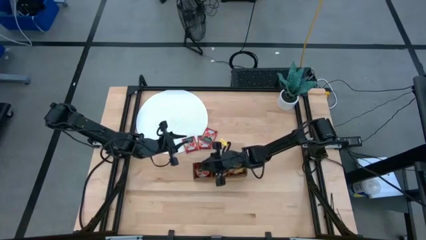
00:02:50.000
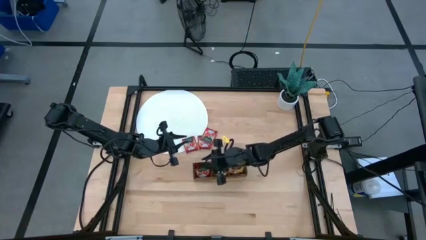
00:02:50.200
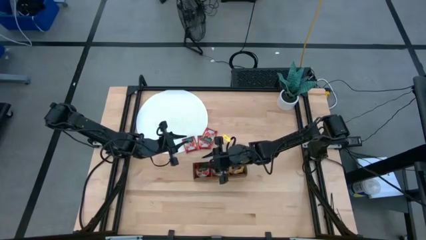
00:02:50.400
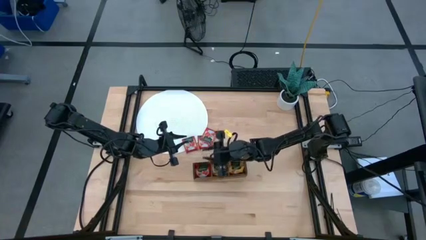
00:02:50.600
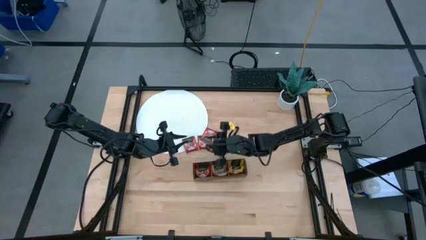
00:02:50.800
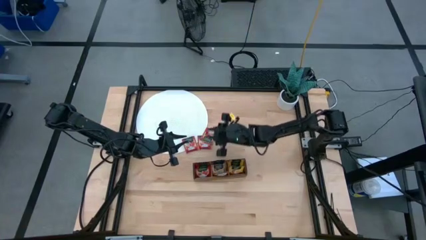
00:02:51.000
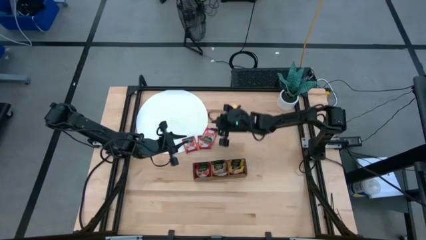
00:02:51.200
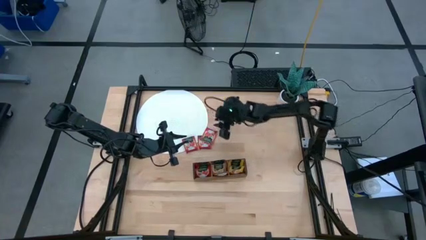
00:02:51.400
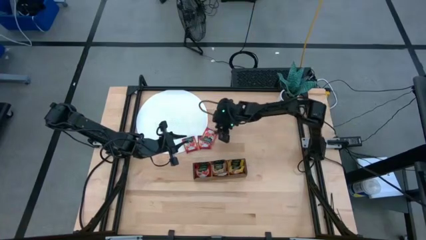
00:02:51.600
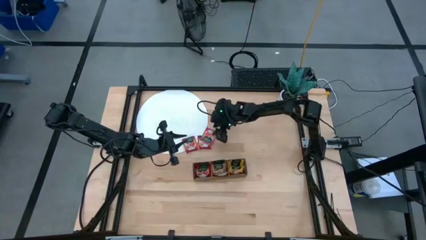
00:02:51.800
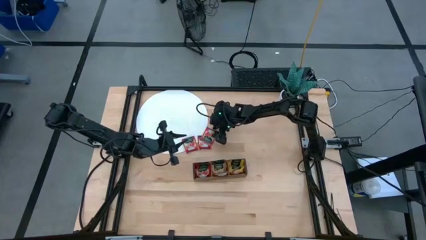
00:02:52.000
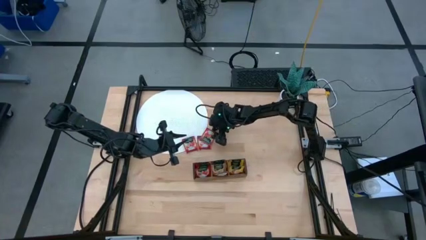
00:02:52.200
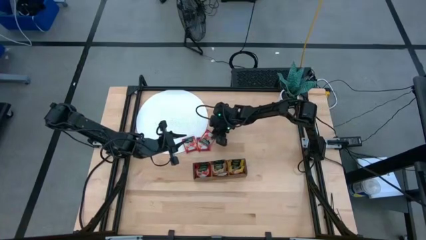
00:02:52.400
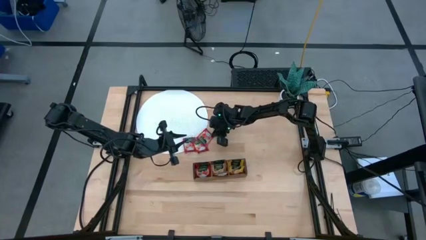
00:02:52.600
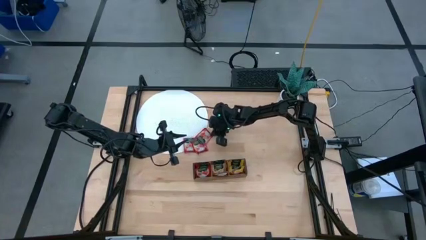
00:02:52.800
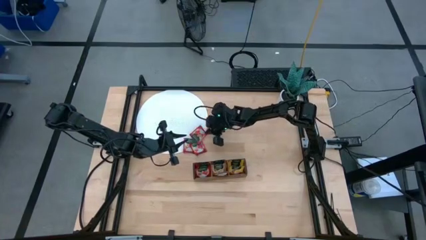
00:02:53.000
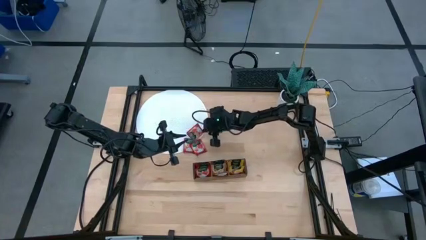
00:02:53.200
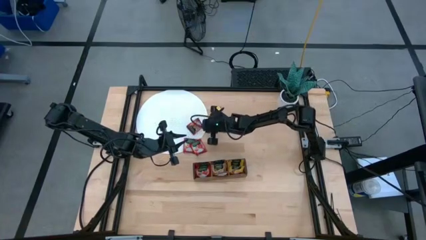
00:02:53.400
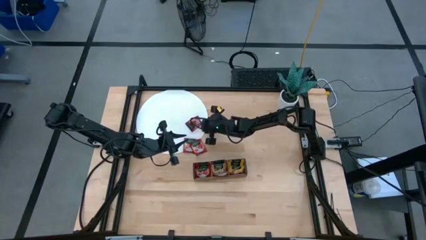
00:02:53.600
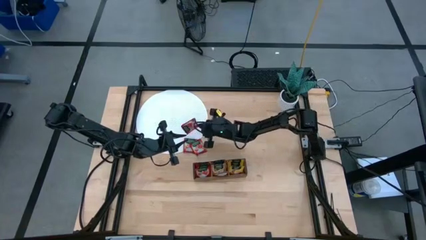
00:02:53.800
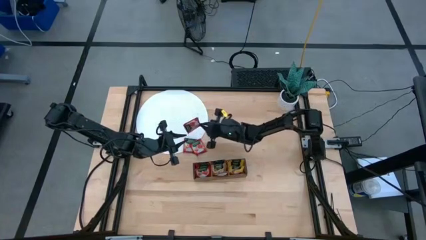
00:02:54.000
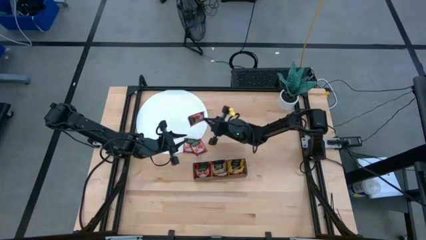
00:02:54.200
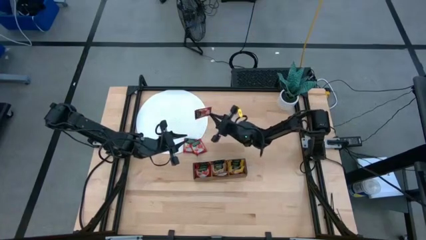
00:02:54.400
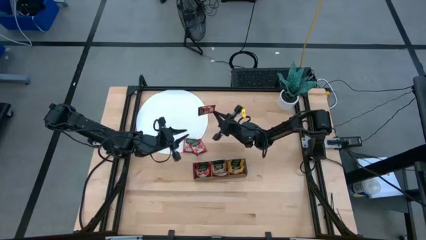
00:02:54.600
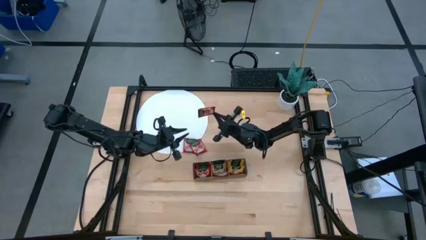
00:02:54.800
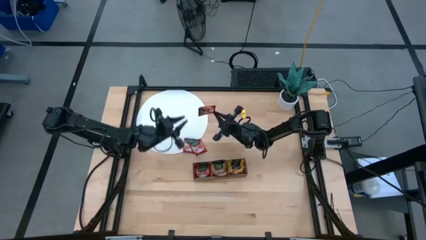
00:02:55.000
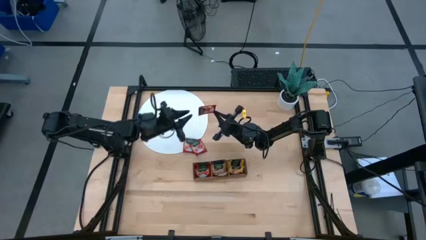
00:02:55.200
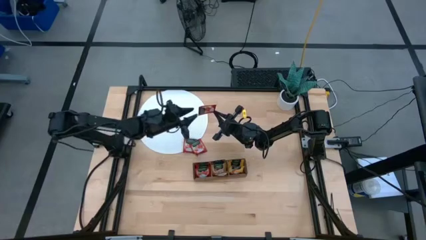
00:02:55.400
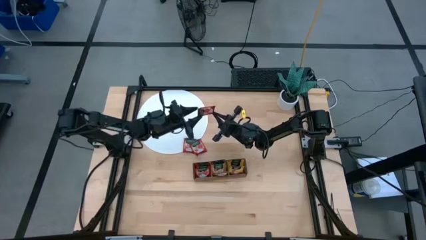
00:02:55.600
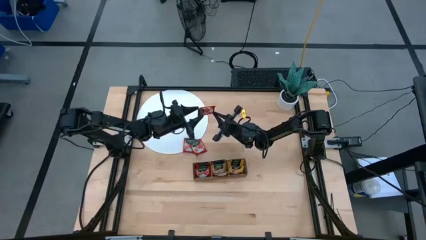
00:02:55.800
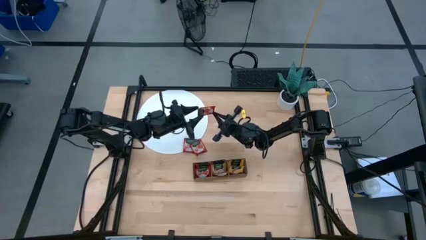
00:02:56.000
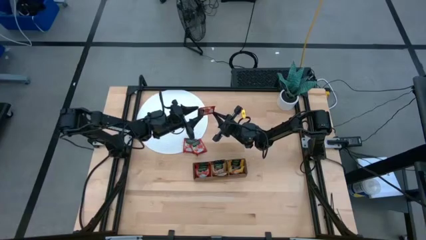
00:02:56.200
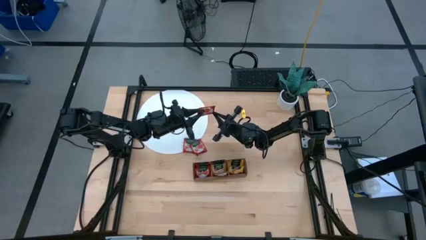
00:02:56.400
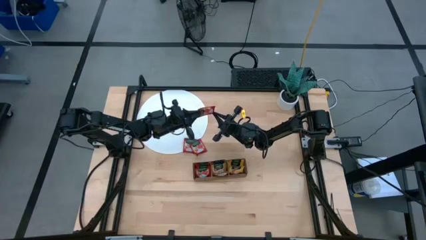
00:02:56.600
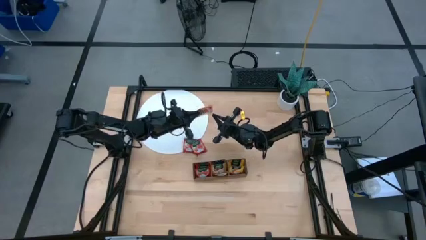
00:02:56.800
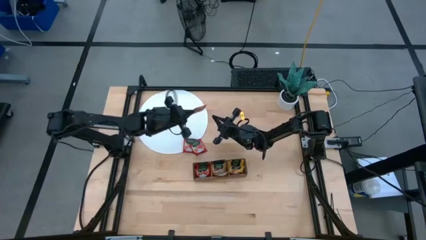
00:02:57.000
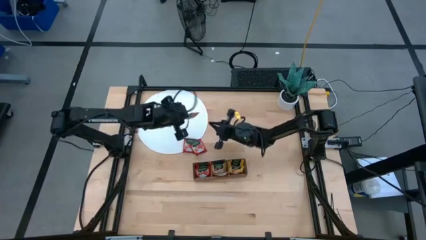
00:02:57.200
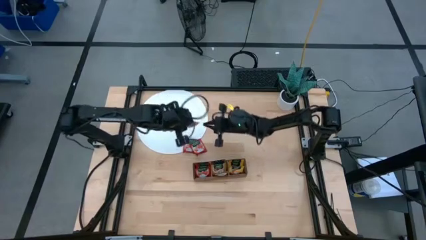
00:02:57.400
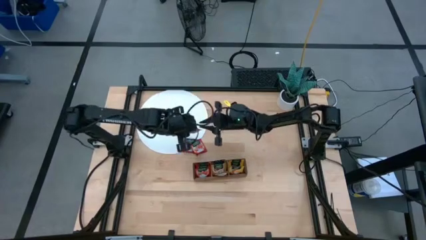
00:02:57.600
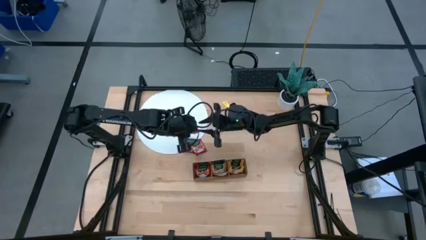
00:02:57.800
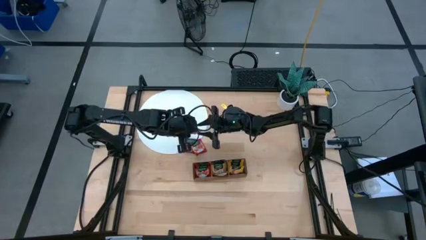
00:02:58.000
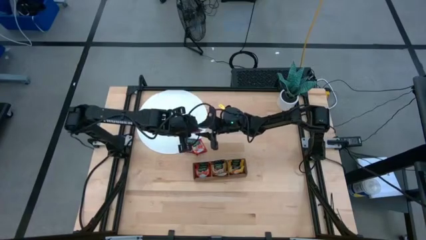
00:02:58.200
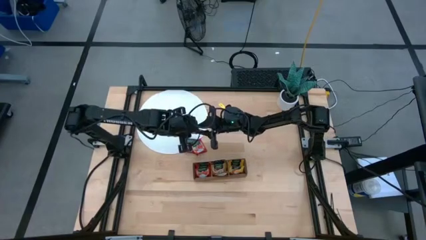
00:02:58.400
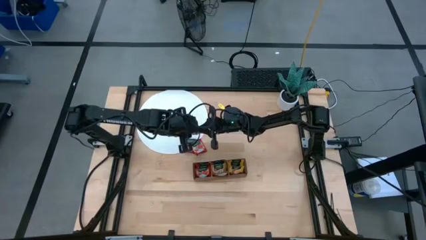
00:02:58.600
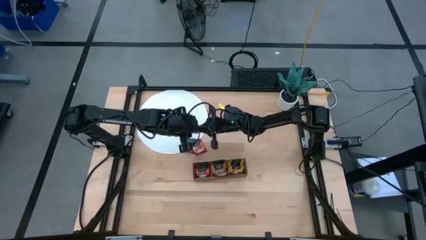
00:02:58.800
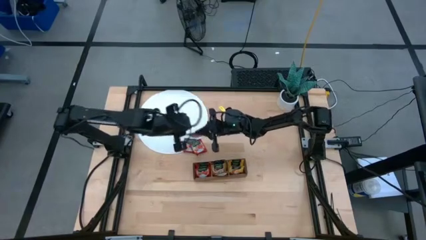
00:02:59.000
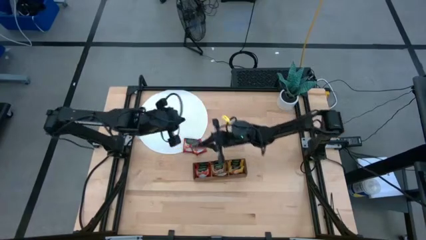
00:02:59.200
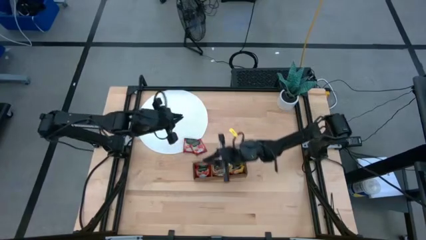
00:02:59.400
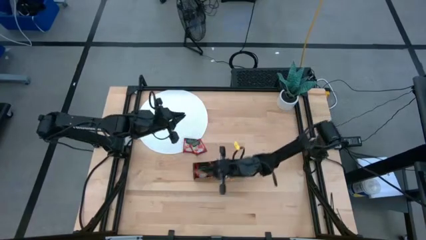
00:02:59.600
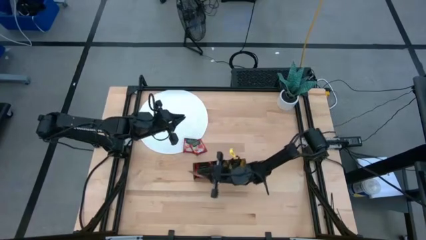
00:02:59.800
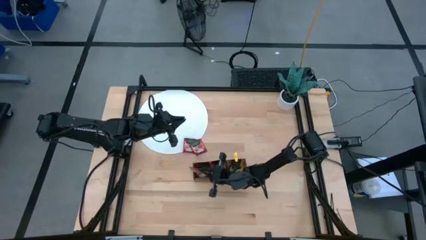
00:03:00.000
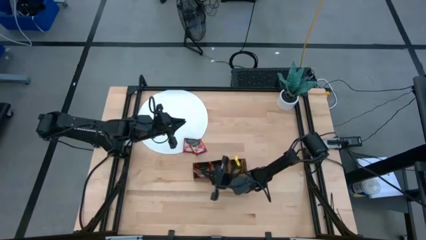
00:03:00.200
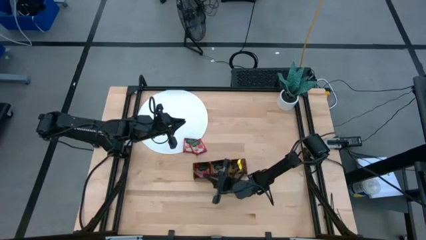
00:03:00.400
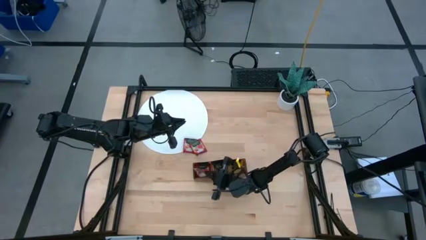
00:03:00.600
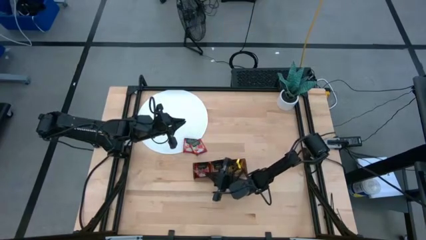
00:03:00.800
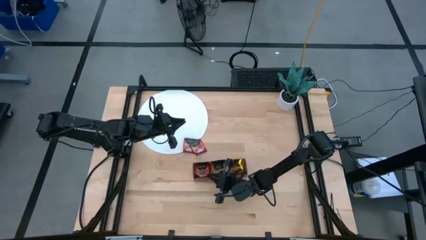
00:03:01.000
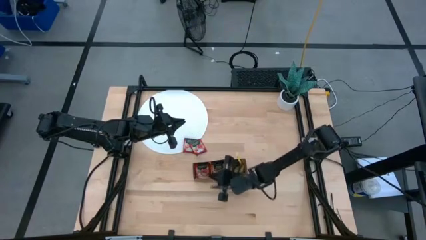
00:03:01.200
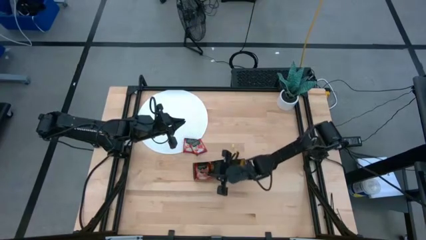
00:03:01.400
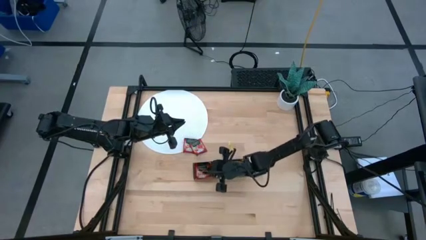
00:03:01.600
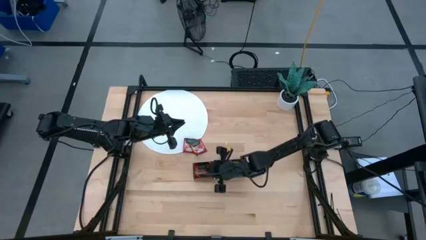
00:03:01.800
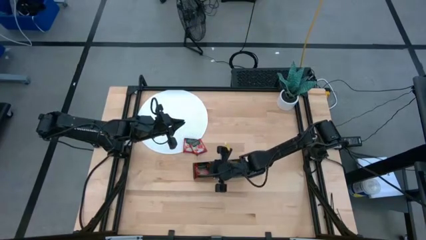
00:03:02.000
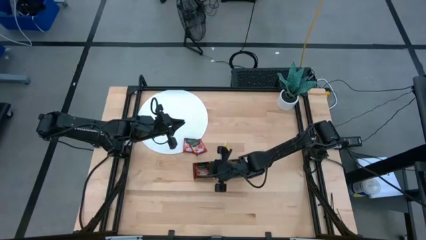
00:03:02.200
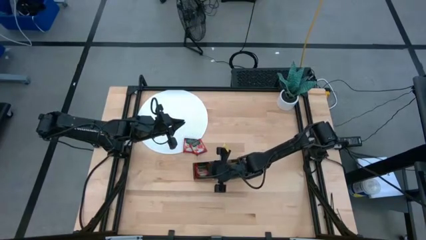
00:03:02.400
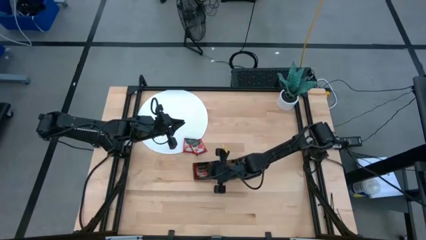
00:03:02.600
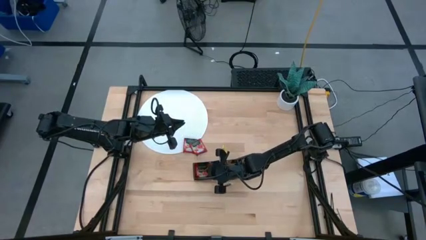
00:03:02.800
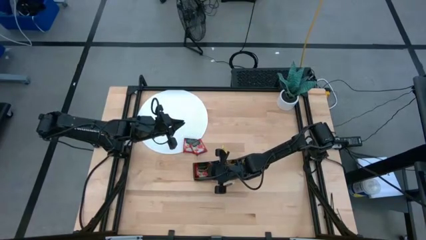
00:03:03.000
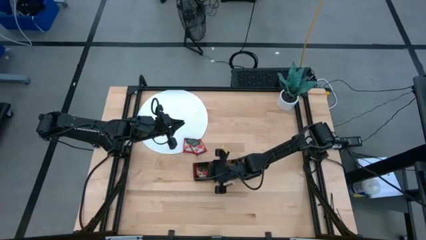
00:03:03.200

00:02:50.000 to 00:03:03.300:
Task: Pick & Place Tea
Put the top red tea bag into the left section of the wooden organizer

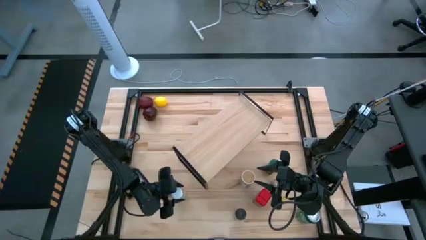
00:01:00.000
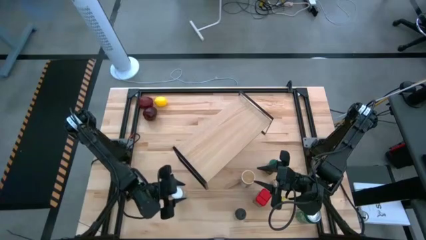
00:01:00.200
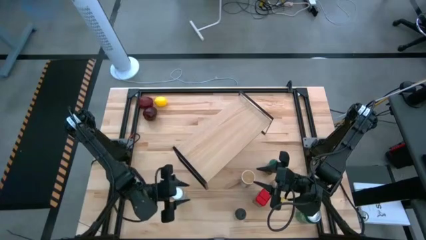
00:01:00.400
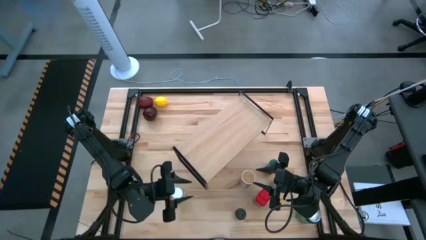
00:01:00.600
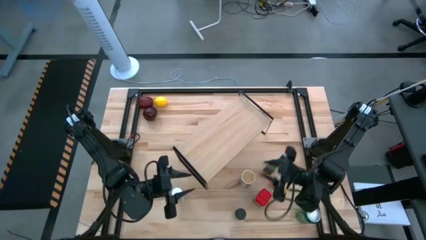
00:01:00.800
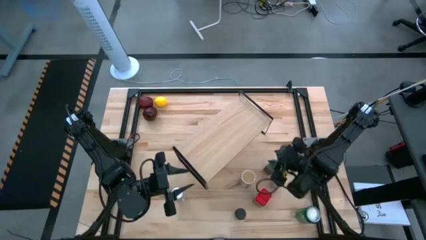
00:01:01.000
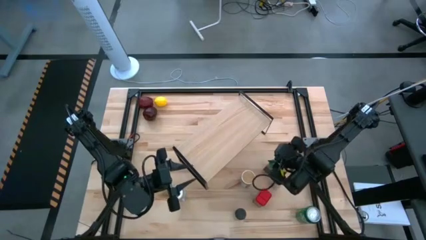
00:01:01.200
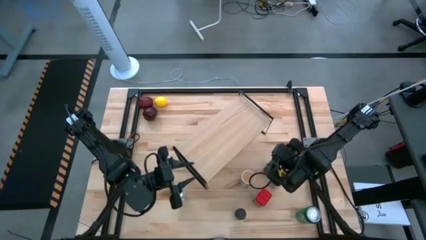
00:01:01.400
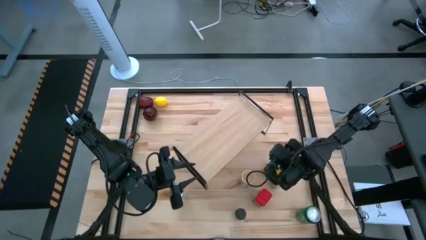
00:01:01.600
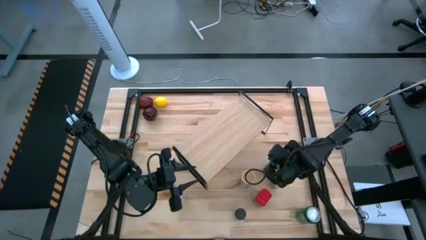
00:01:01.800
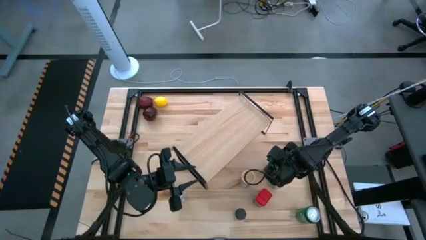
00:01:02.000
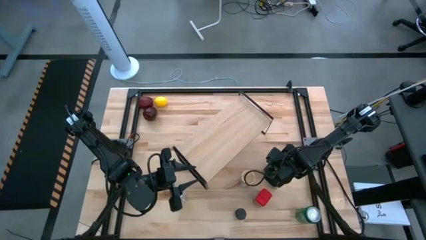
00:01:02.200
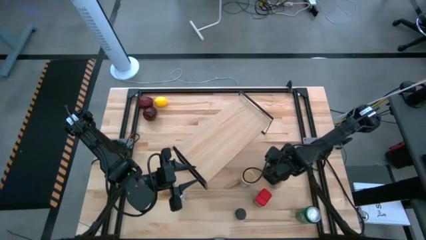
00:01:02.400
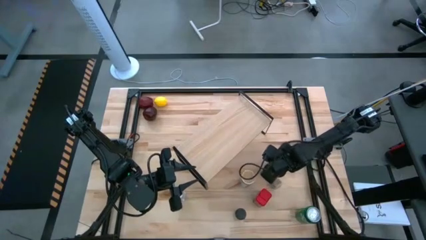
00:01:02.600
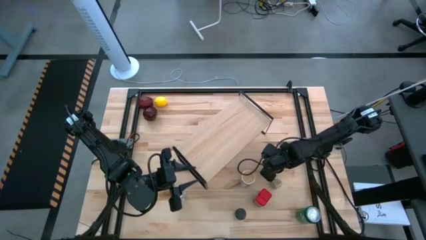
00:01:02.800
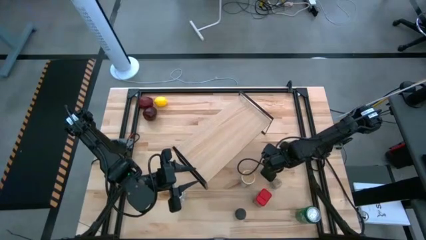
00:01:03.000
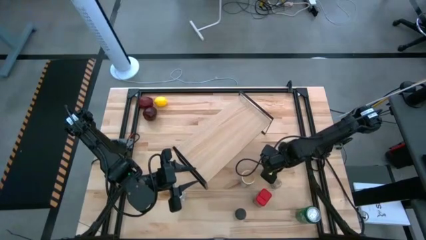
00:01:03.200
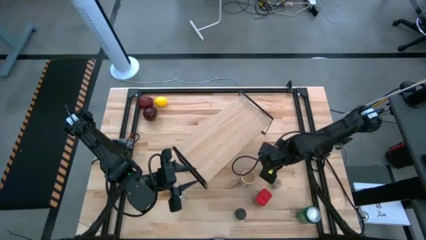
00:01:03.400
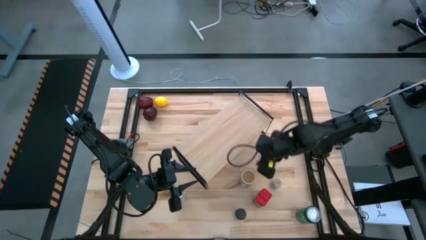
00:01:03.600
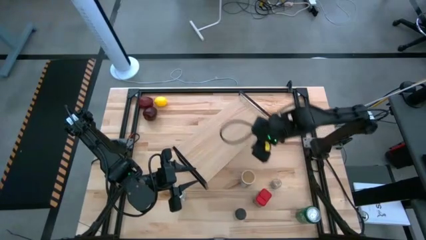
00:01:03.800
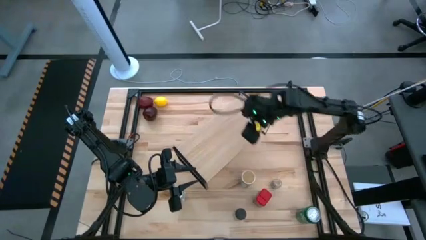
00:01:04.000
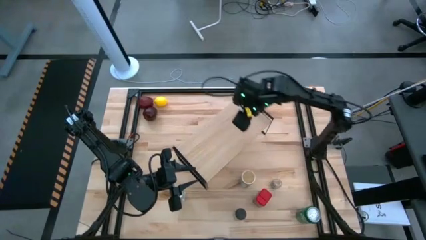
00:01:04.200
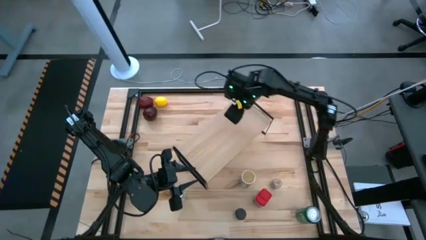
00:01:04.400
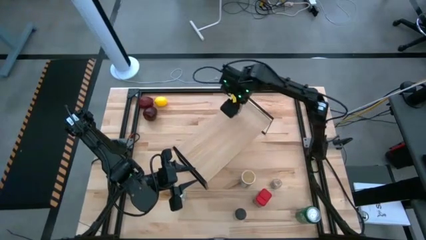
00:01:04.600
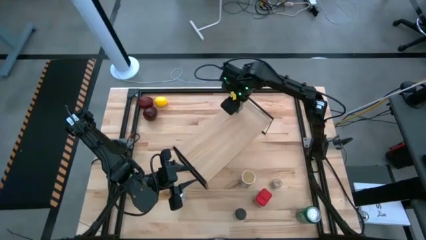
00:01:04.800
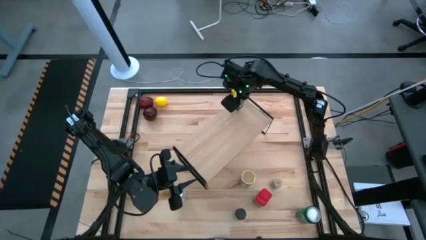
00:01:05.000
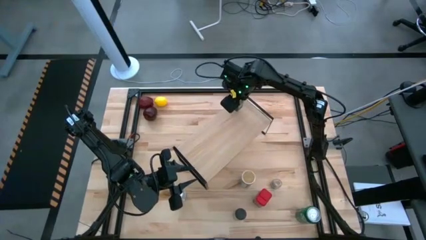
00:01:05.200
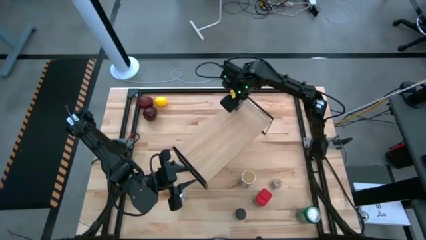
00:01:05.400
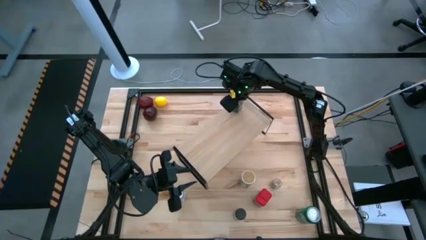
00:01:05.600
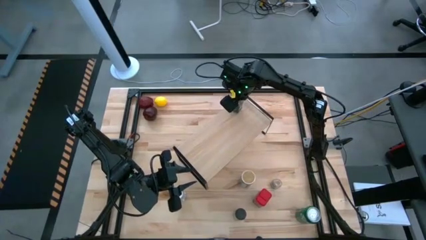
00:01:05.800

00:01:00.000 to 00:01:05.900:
Task: Shelf spices
Put the green seasoning bottle on the shelf
